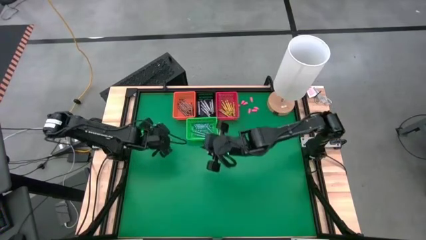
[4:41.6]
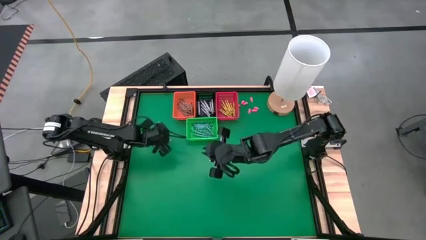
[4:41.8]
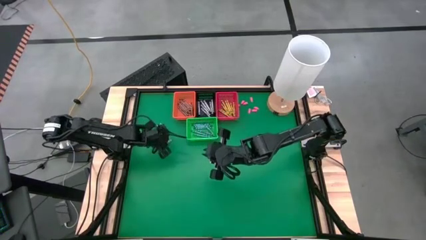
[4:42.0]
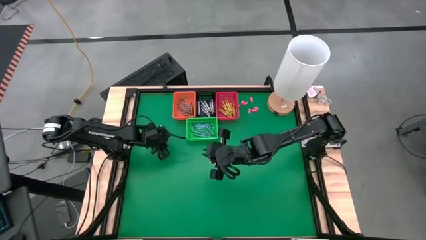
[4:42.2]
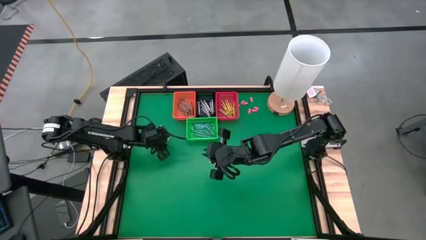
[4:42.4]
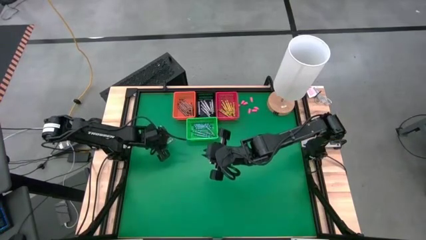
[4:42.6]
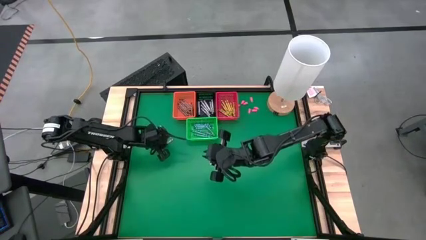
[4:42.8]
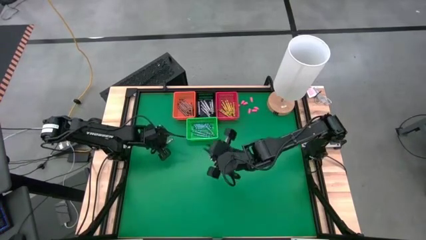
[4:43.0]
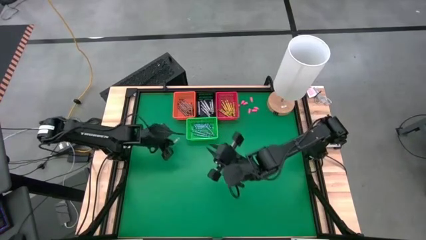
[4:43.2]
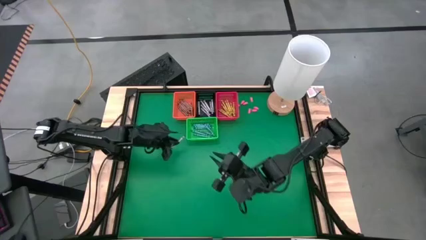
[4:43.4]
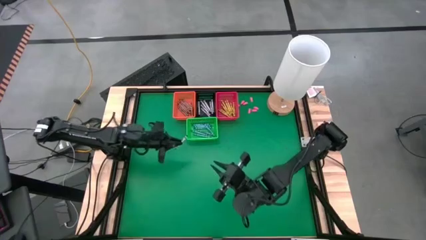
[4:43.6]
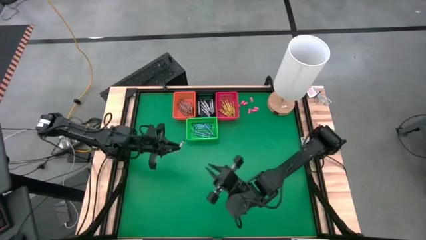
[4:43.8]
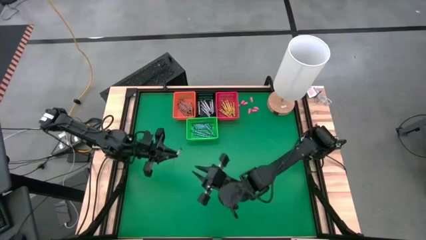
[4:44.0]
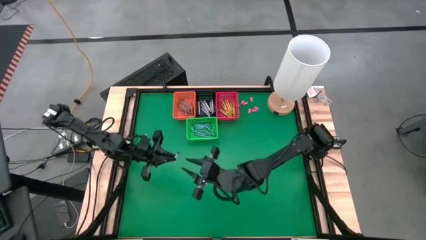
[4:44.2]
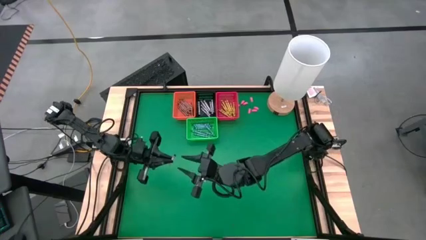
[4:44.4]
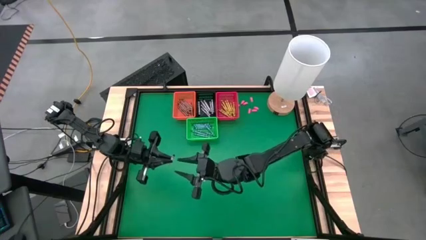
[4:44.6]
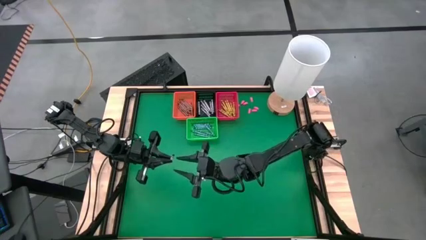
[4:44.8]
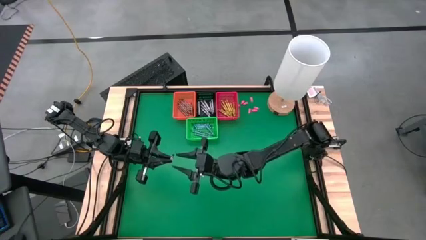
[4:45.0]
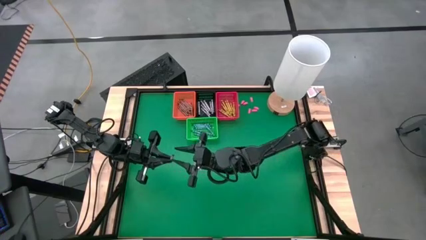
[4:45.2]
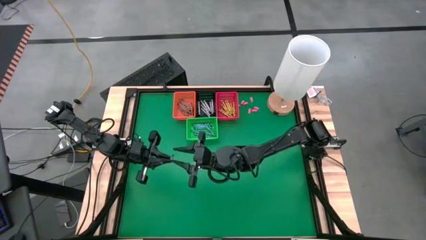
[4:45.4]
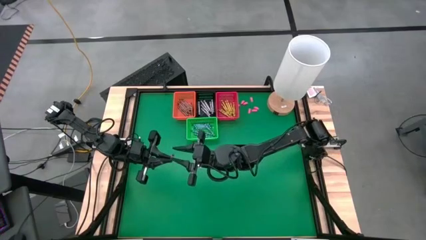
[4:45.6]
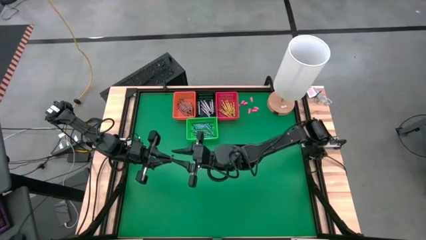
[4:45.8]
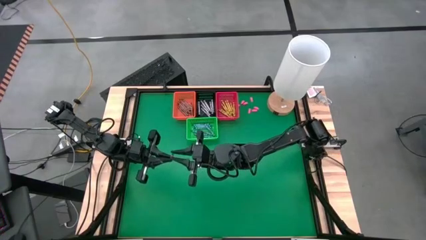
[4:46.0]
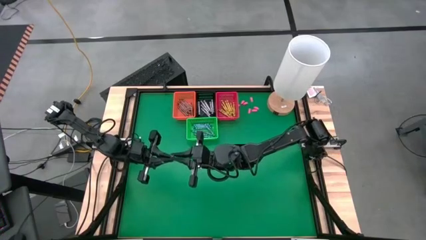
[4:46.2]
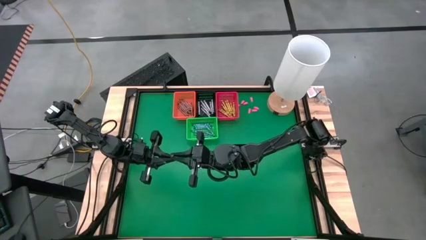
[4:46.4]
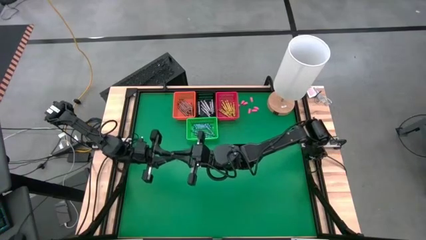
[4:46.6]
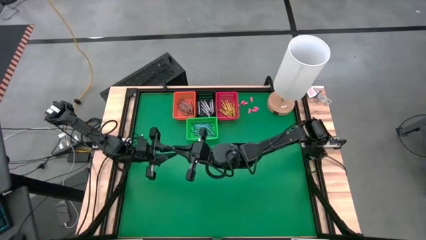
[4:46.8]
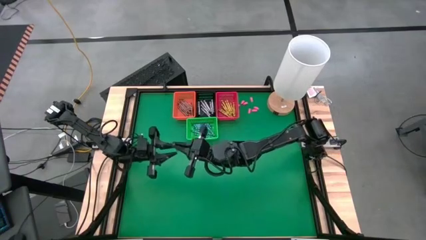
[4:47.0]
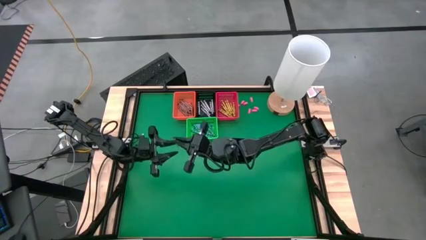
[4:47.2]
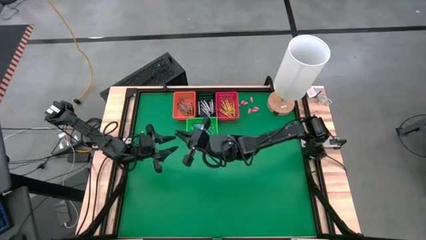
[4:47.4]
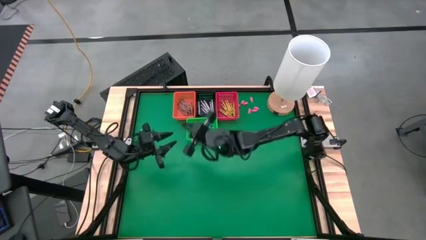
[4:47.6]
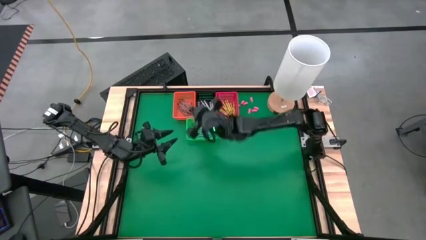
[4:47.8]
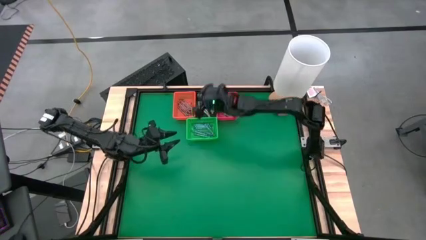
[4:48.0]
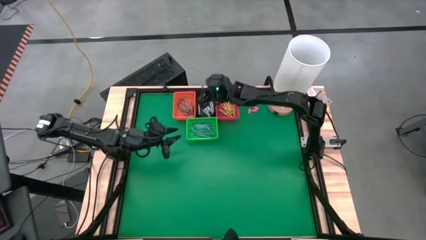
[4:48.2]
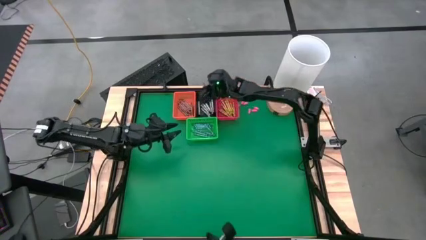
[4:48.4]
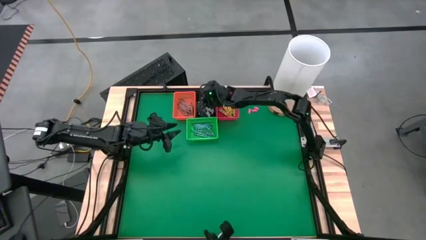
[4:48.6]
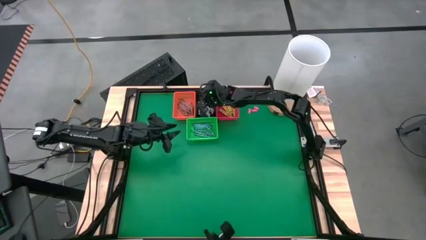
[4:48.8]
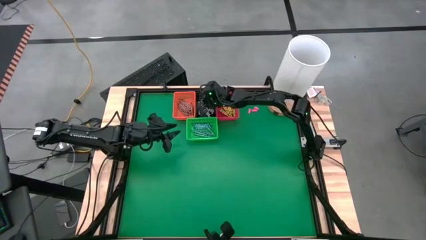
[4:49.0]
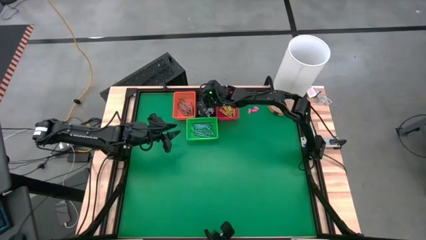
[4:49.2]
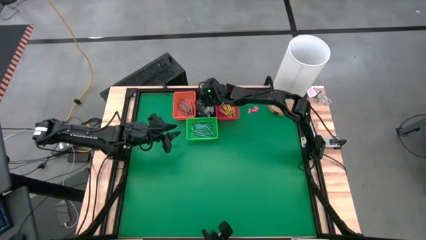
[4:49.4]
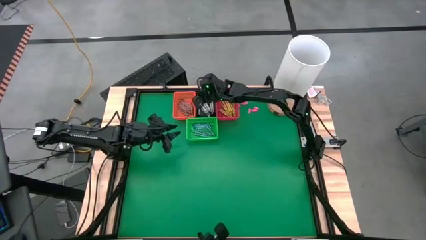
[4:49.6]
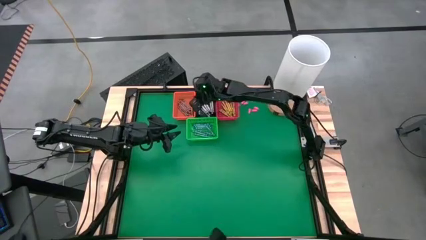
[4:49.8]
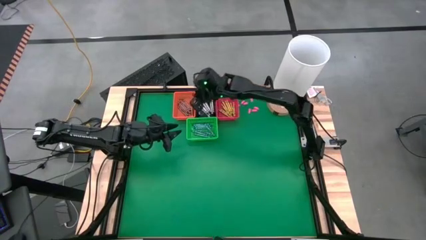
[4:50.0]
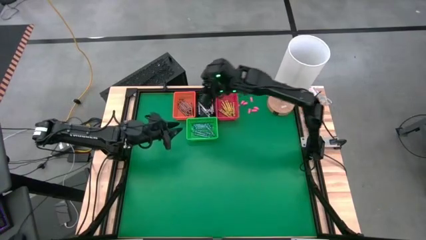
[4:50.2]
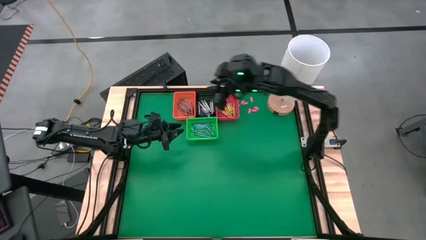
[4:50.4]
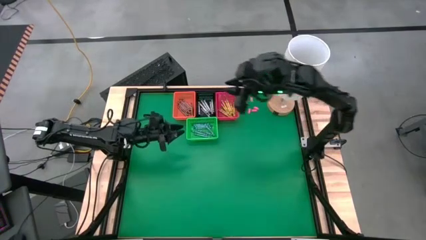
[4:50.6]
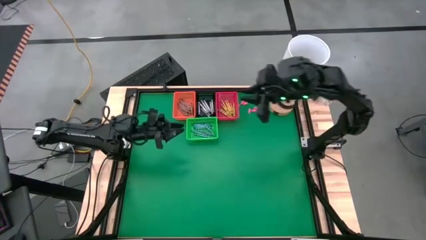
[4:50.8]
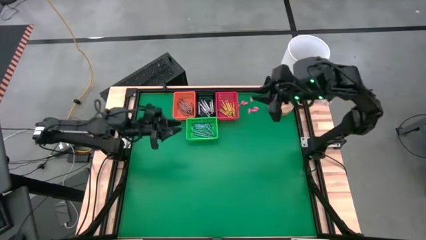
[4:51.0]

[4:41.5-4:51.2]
Task: Sort crayons
Put a black crayon in the black basket

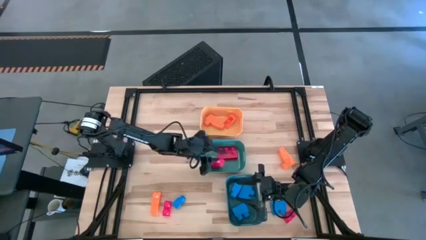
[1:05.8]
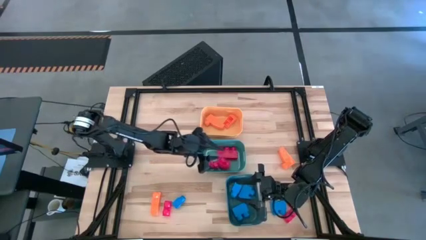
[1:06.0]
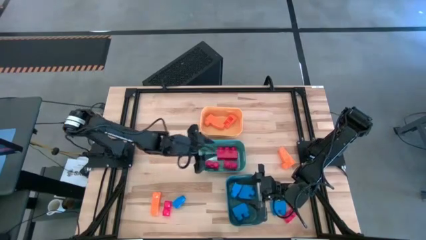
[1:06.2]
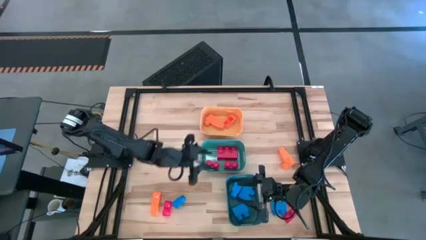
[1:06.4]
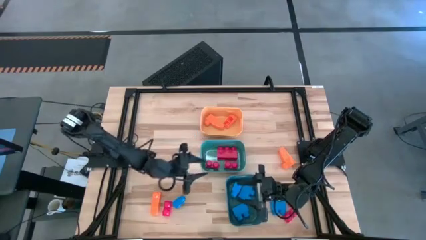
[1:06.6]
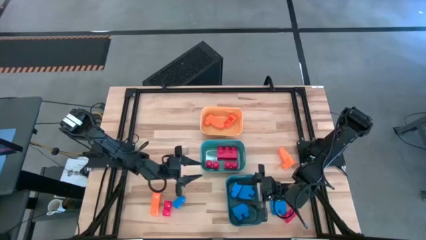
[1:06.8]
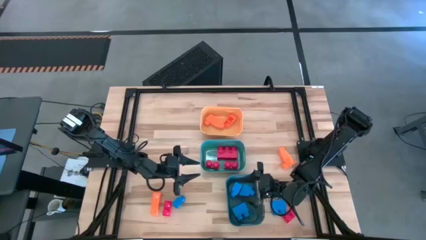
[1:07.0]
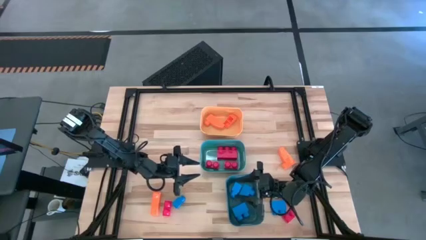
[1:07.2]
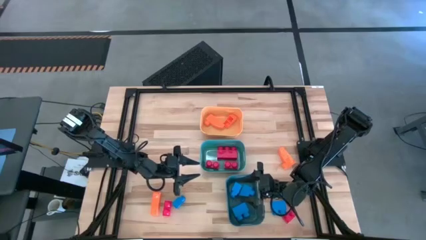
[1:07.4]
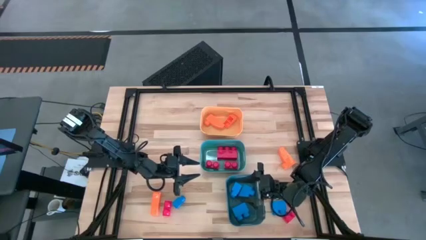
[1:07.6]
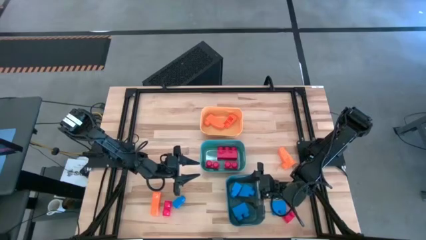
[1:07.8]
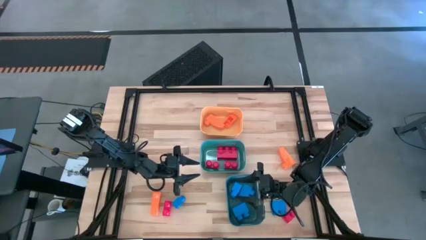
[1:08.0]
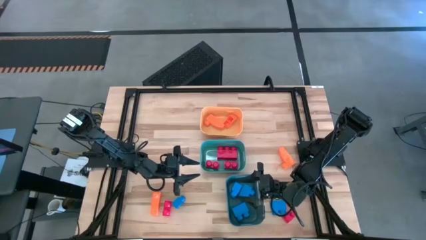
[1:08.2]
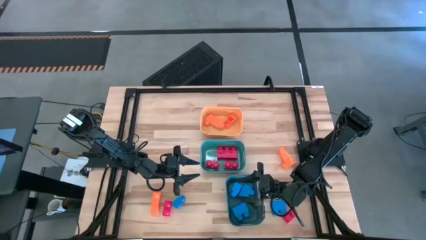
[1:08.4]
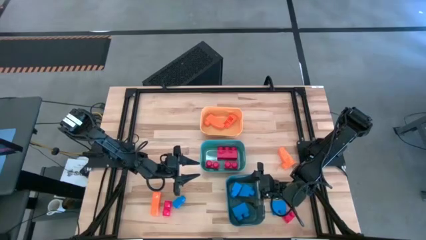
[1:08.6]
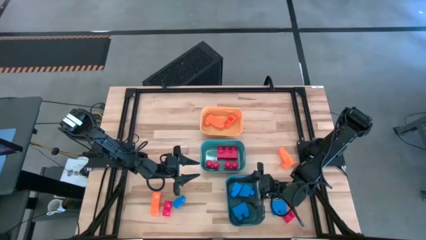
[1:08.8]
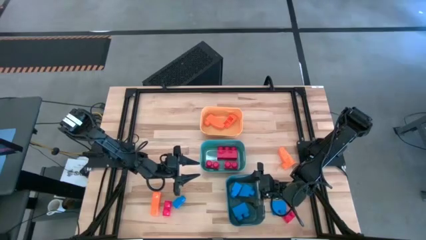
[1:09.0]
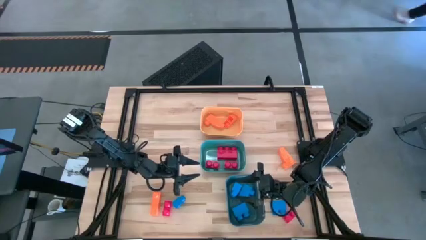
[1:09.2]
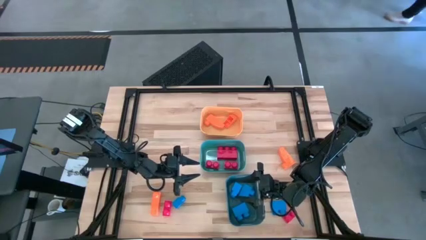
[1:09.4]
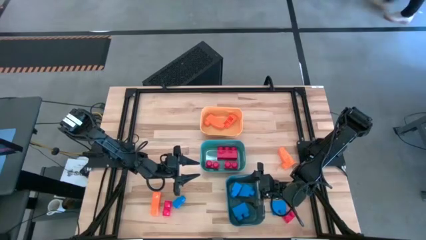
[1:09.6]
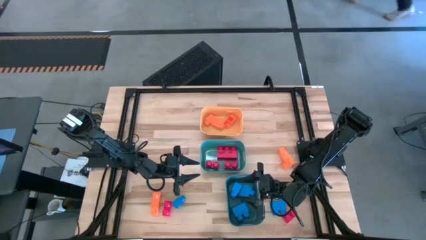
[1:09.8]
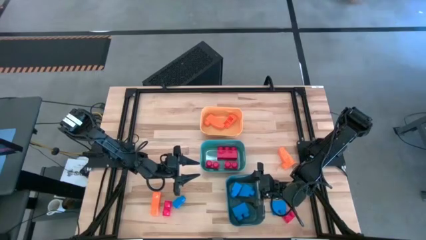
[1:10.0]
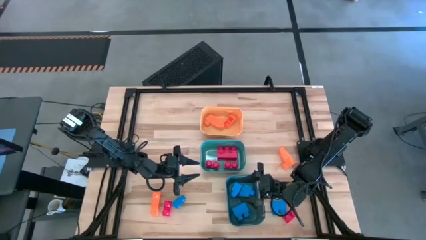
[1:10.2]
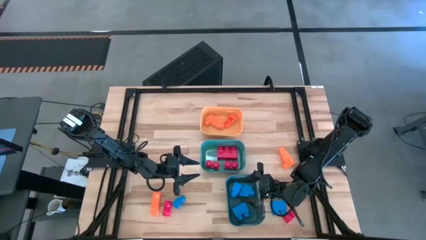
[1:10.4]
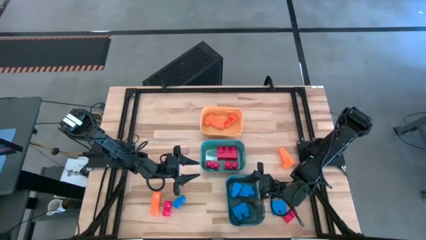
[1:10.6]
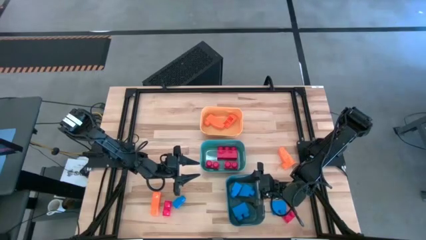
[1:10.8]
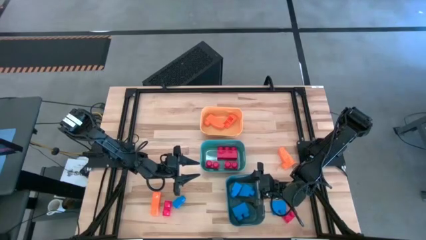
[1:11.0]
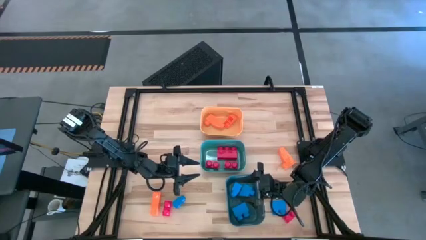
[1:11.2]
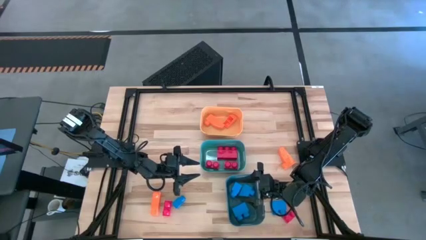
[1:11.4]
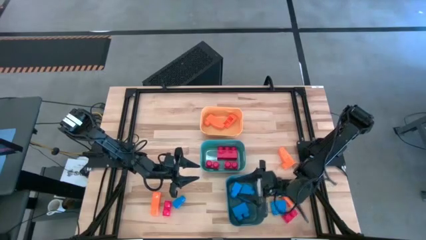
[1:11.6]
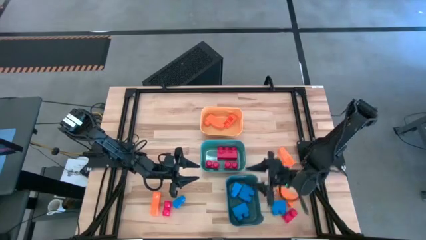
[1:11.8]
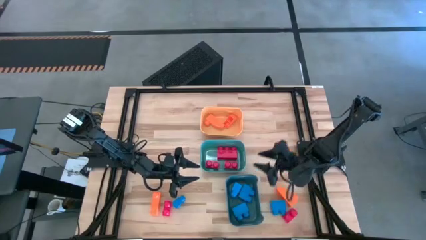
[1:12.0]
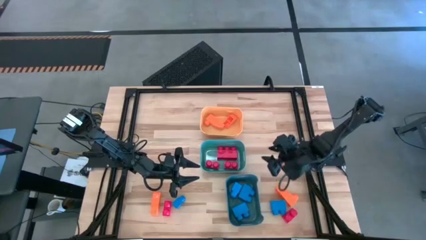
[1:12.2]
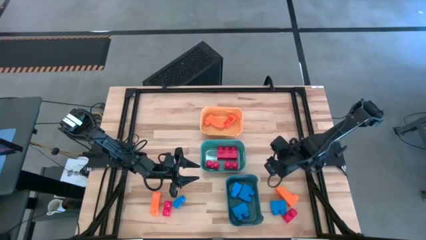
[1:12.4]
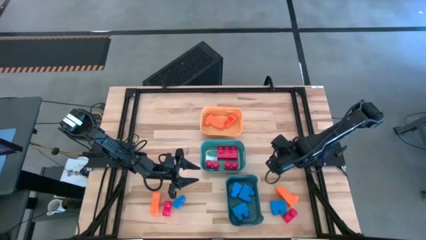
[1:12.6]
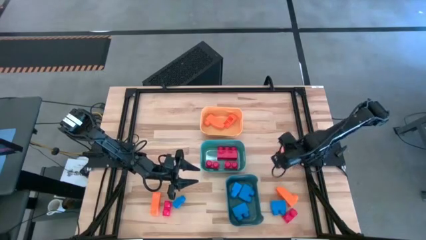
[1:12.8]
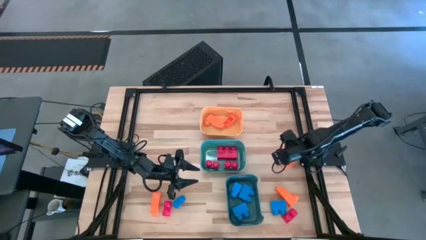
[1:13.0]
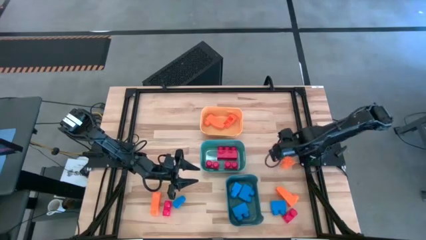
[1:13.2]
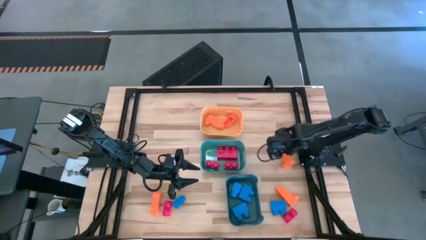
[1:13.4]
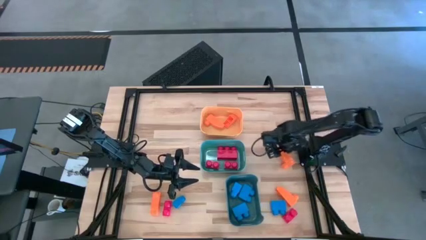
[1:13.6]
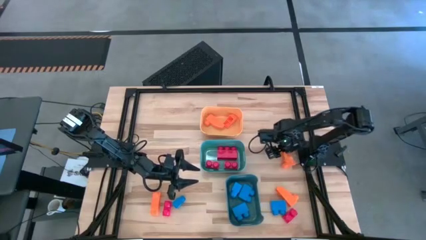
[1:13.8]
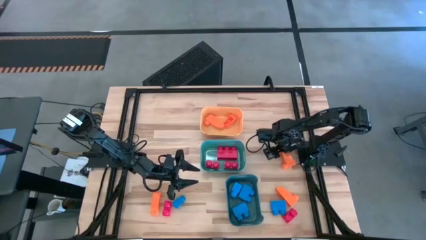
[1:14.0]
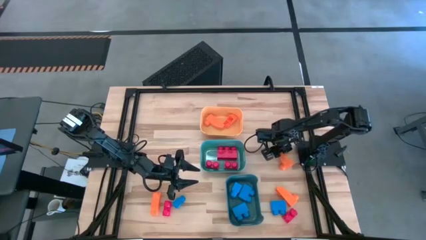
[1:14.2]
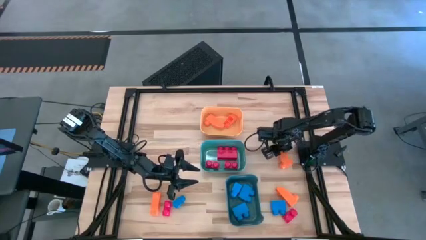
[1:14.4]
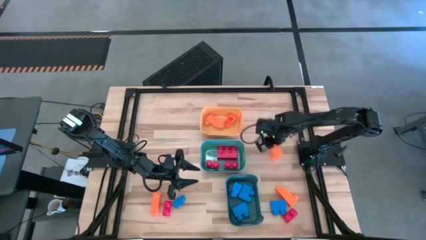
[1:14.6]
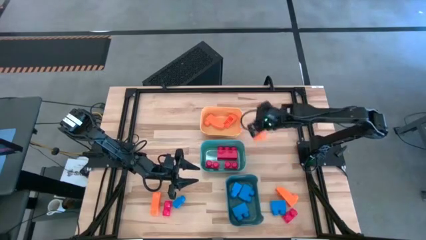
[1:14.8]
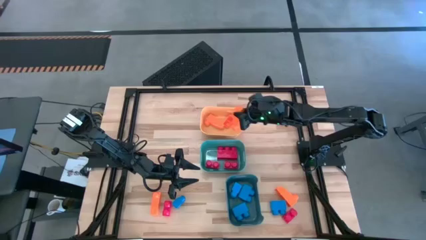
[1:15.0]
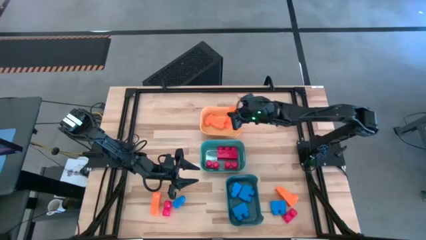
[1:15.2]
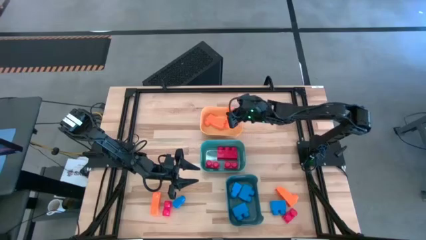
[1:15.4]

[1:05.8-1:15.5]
Task: Sort & place blocks by color
Put the orange game piece into the orange bin
